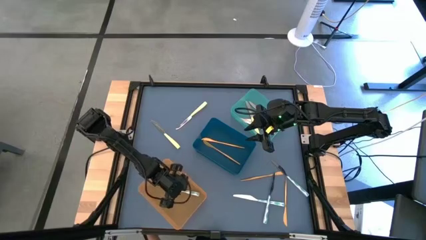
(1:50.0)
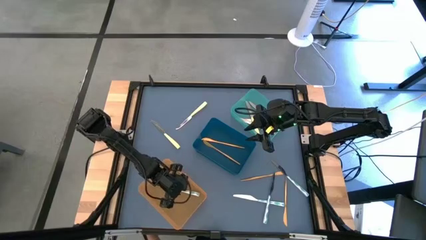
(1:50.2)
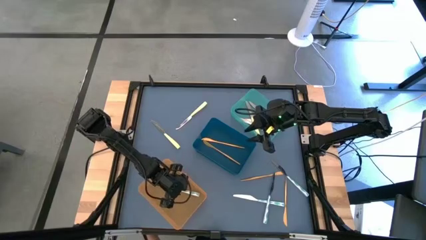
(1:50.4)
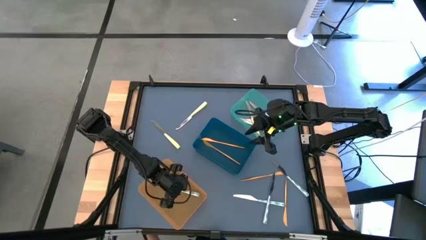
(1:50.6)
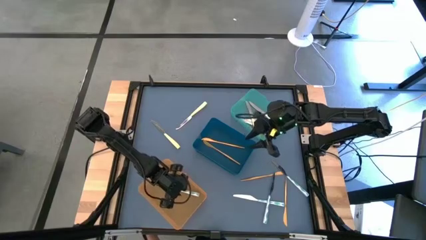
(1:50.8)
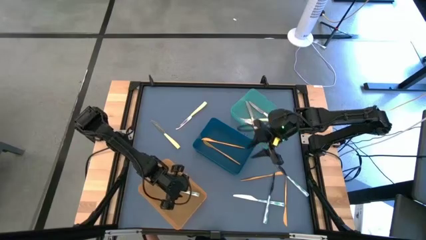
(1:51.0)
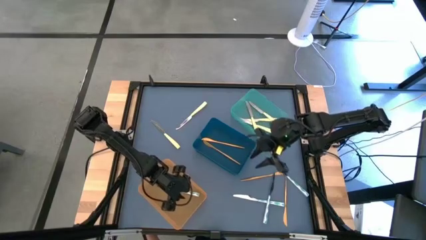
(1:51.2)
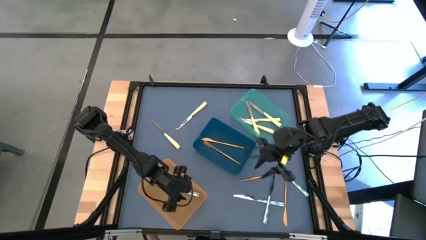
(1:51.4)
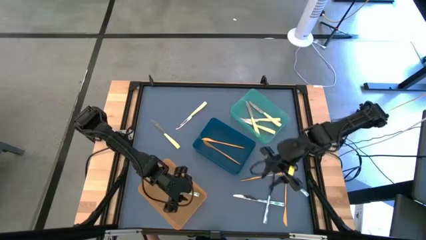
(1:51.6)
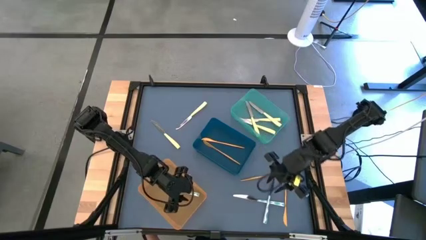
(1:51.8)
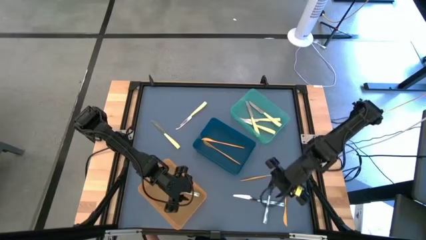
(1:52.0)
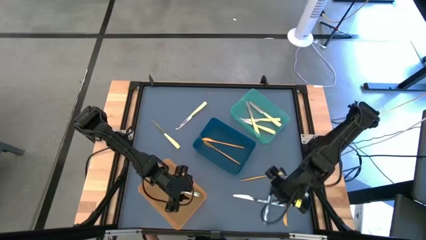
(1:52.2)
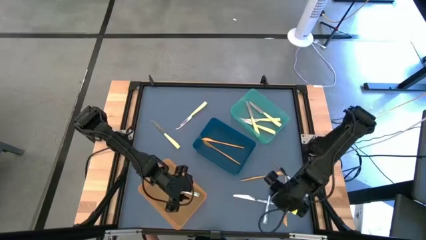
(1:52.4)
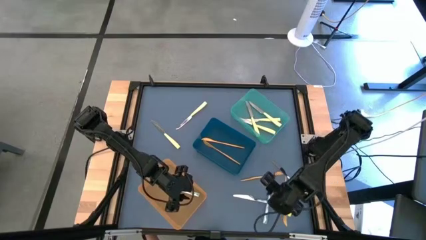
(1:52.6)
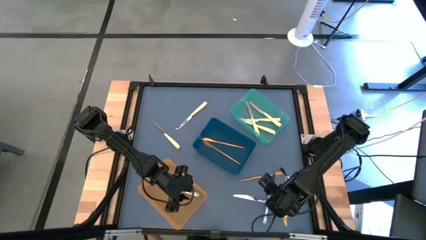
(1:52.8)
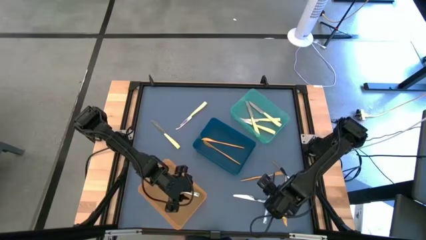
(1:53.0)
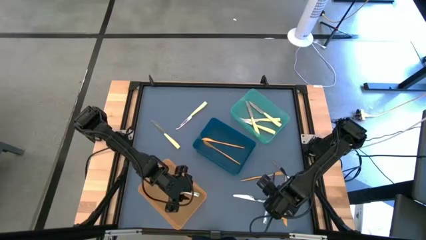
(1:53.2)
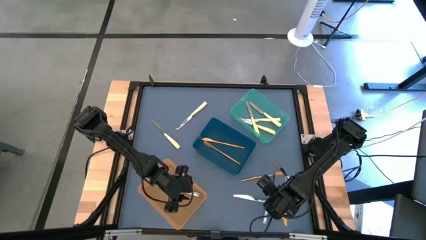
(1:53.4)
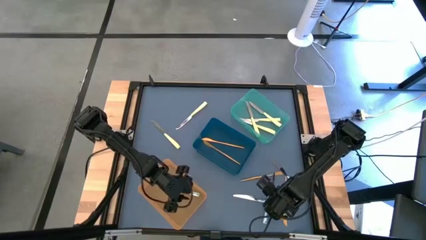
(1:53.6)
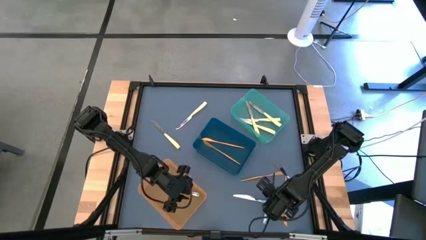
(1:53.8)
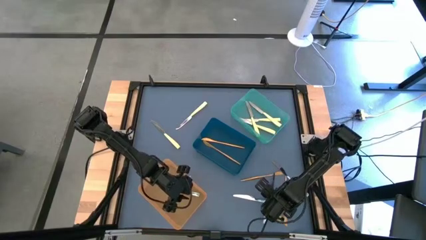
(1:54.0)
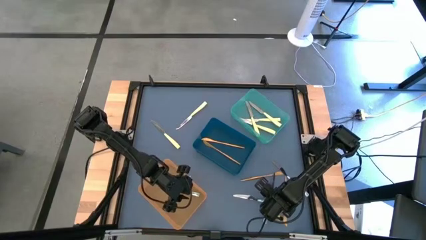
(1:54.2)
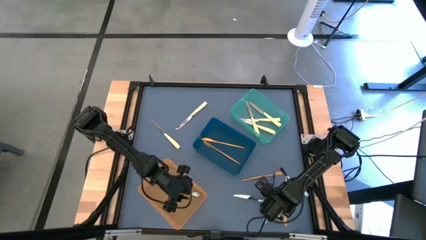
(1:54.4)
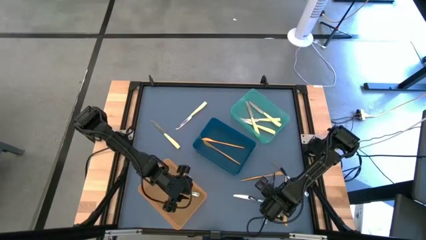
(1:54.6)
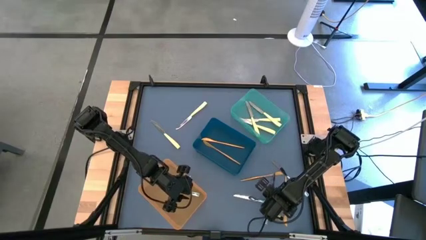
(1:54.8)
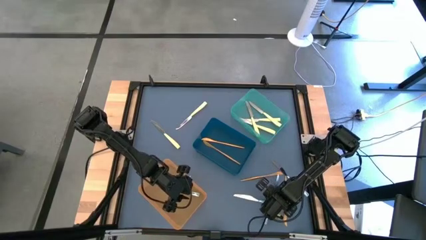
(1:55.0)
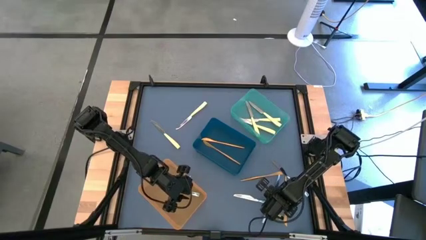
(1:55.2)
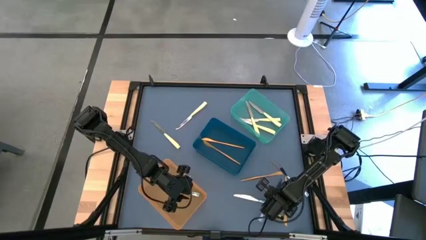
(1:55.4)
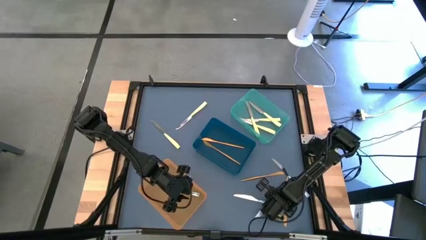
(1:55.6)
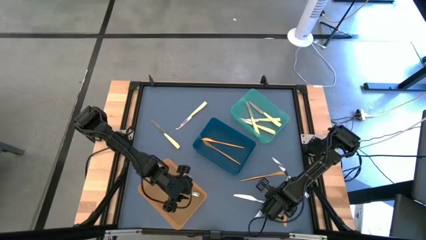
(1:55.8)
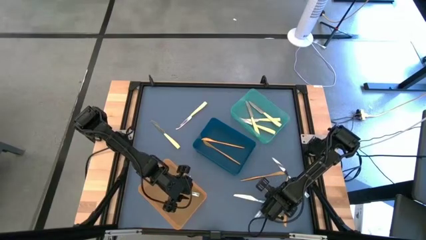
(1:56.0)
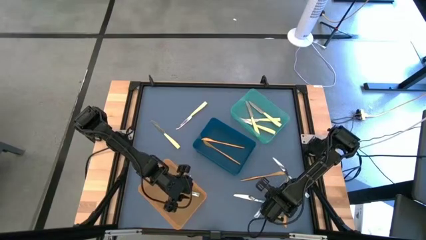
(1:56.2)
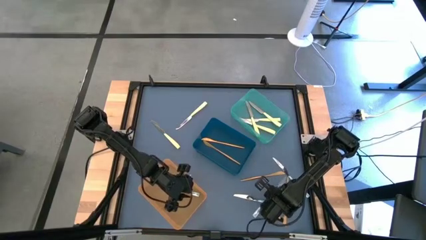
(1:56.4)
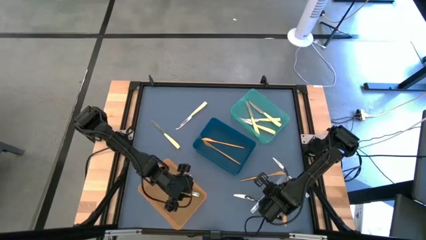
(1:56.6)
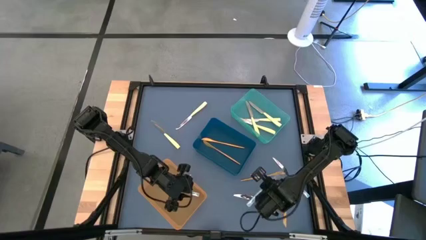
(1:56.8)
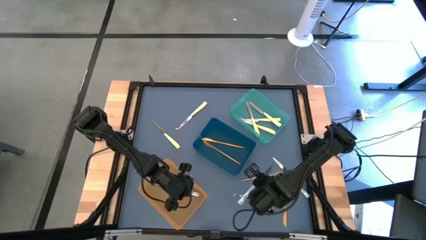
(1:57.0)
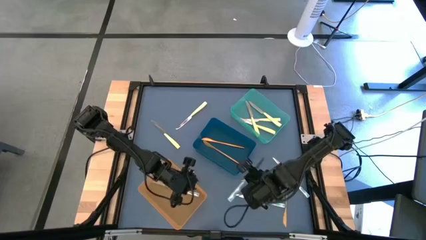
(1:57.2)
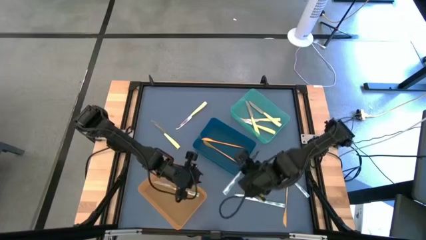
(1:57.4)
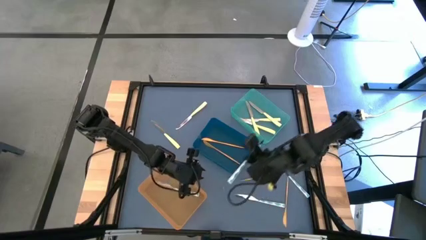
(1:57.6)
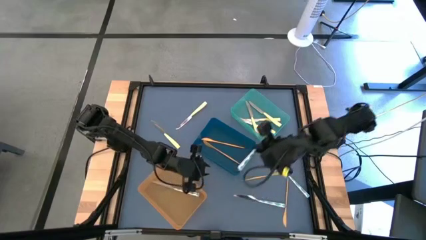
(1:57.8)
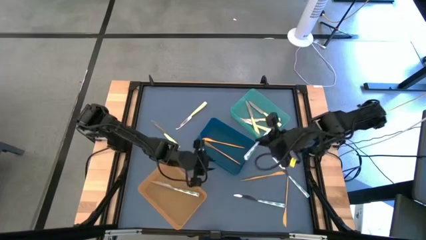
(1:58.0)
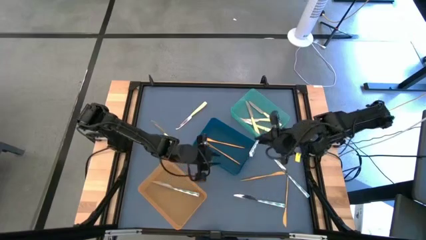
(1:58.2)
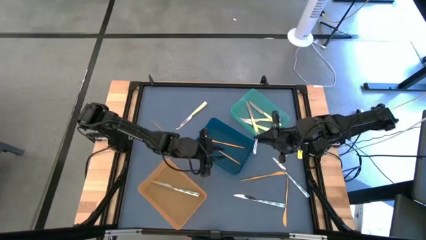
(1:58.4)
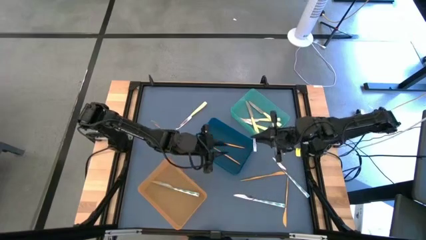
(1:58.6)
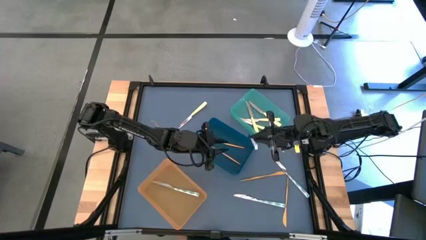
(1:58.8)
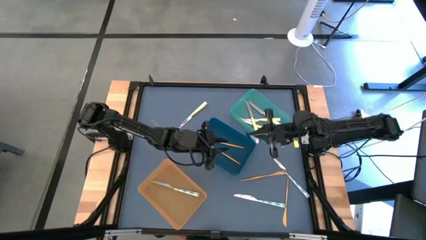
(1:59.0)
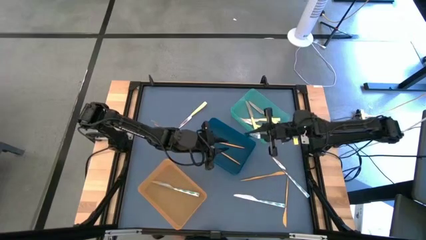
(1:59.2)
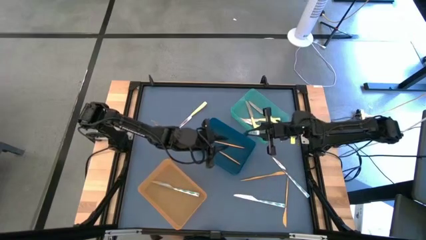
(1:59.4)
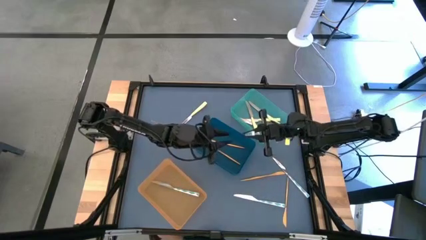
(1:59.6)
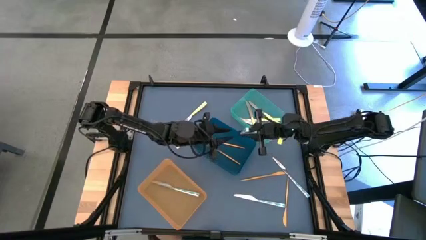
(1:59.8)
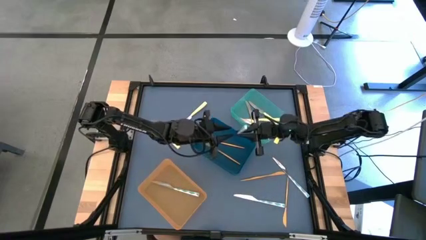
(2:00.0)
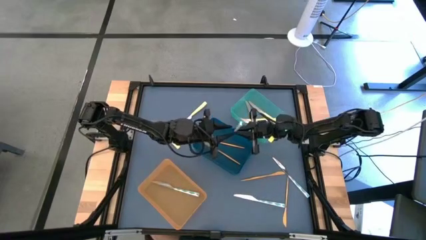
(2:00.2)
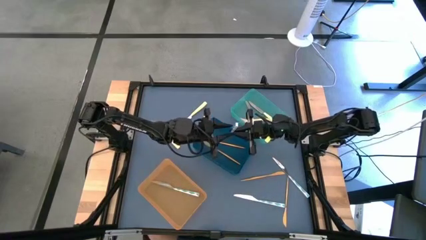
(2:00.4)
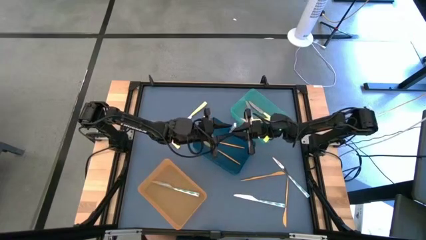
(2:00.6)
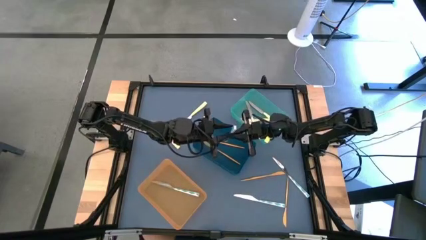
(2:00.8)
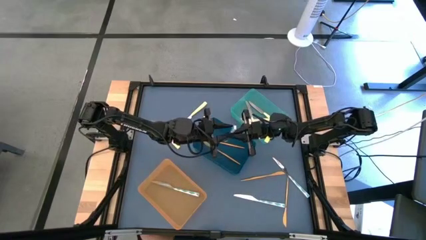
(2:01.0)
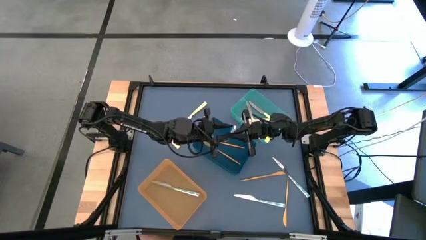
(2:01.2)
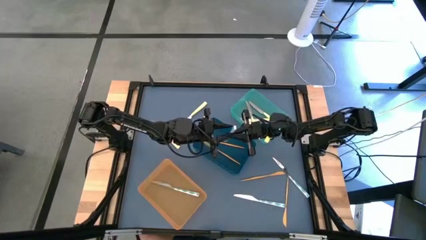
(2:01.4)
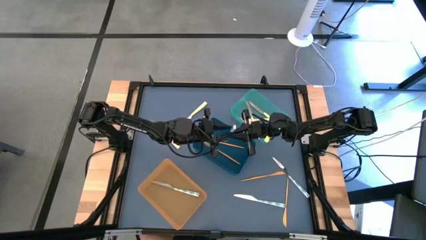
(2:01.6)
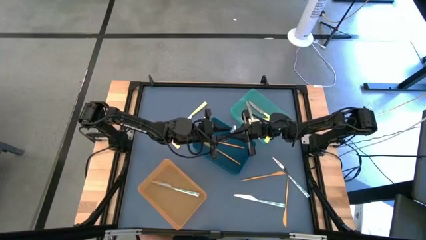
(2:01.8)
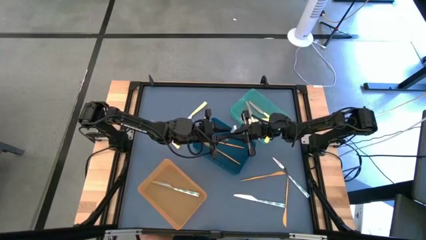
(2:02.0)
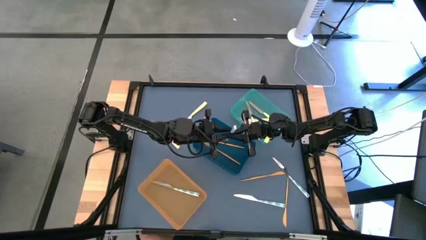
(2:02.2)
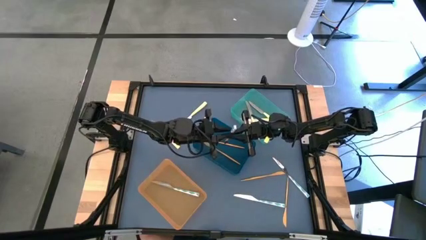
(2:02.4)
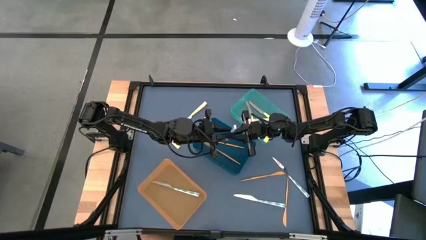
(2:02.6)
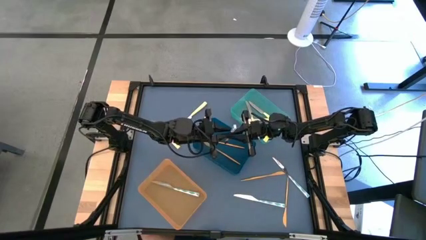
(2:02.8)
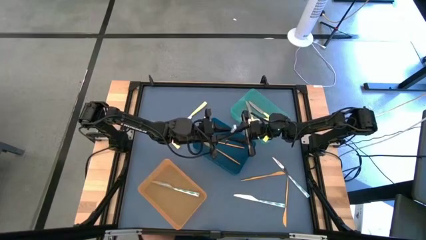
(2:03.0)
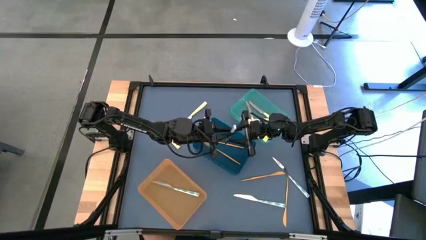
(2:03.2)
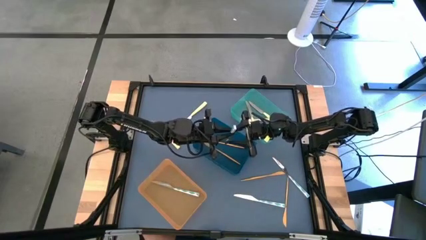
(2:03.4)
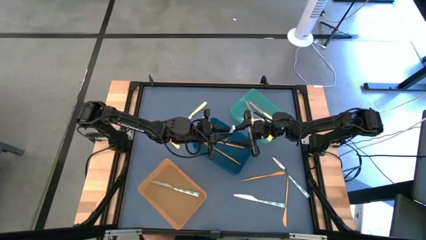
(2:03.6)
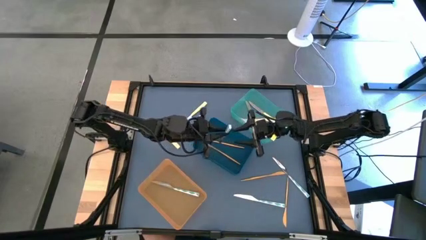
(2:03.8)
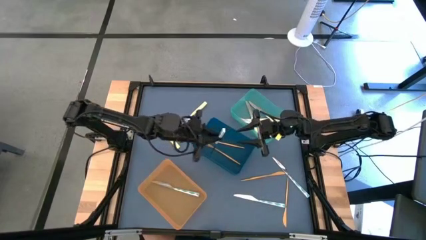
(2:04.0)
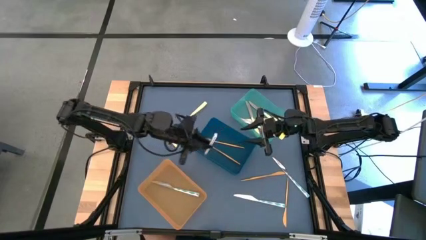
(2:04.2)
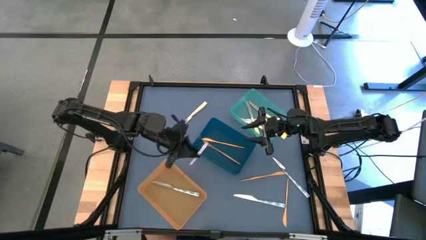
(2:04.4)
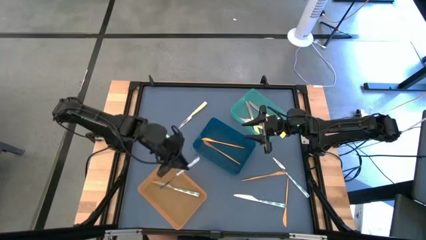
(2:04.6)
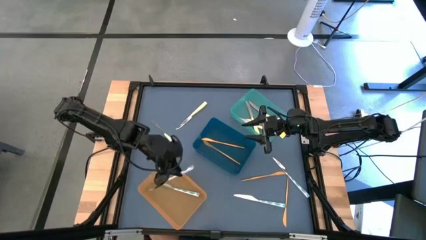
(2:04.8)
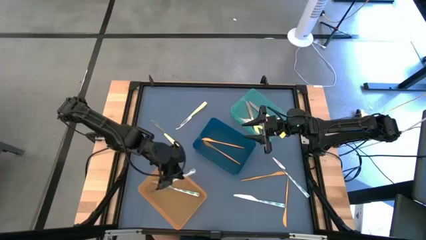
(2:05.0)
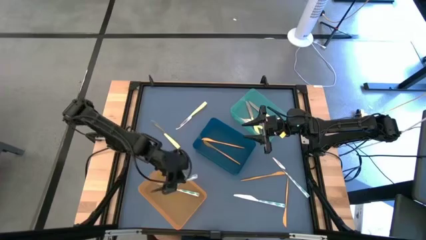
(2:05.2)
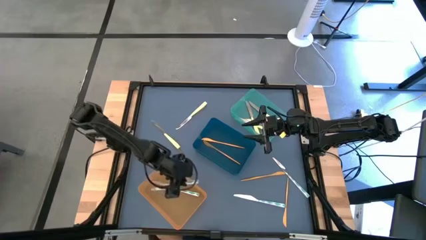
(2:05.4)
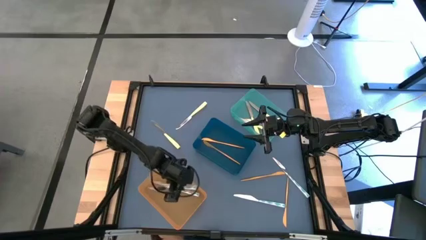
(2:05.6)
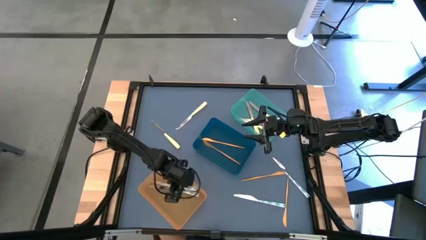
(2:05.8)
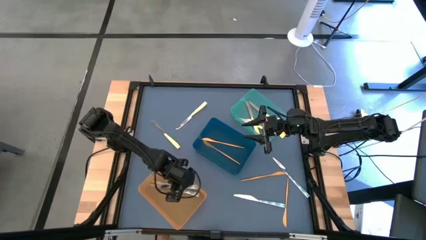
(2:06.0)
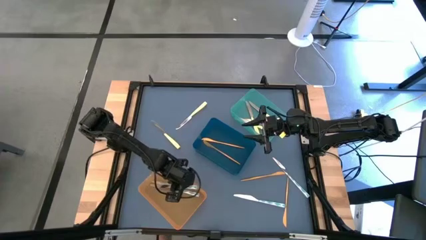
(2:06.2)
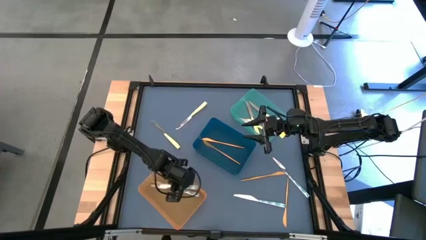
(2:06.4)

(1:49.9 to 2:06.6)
Task: Sort silverware by color (type)
Put the right blue knife into the orange bin
